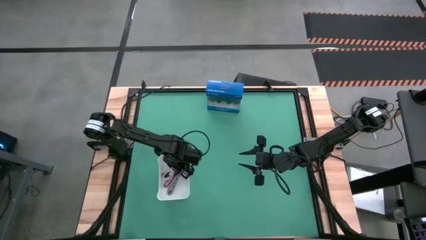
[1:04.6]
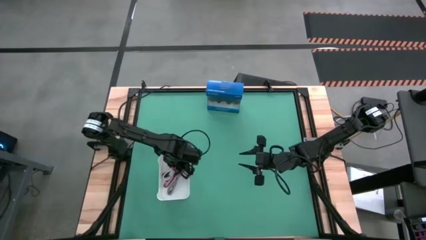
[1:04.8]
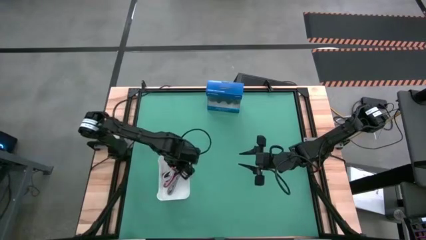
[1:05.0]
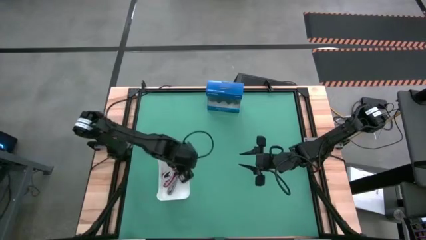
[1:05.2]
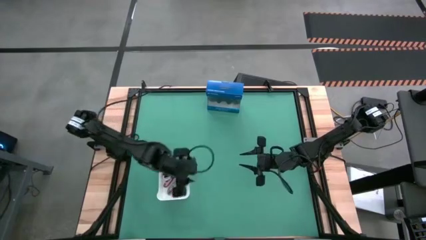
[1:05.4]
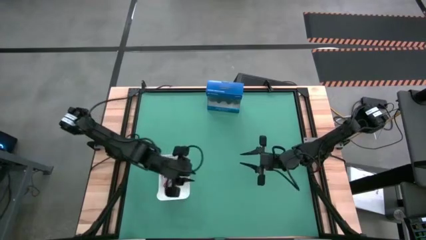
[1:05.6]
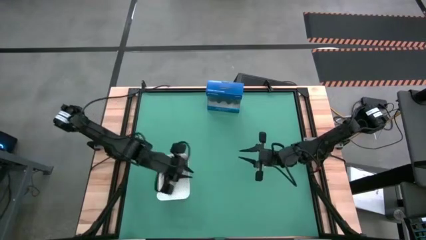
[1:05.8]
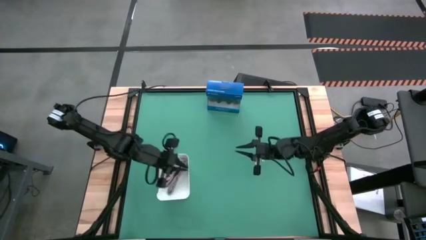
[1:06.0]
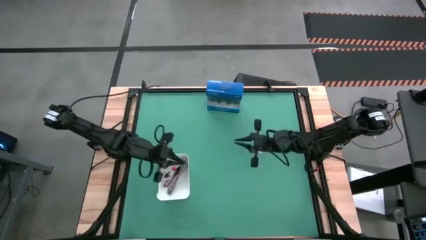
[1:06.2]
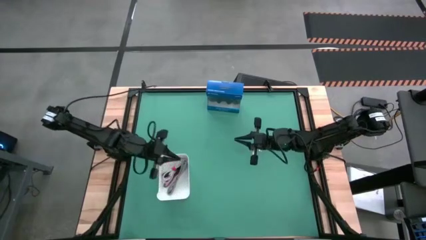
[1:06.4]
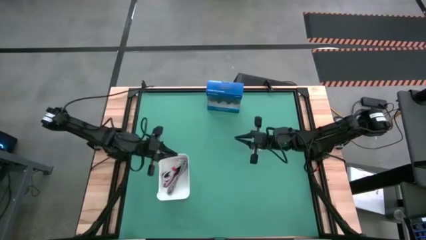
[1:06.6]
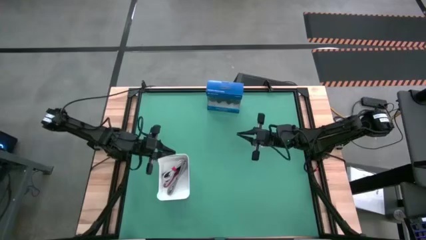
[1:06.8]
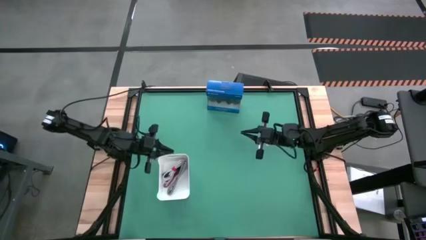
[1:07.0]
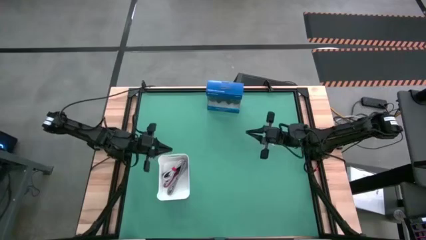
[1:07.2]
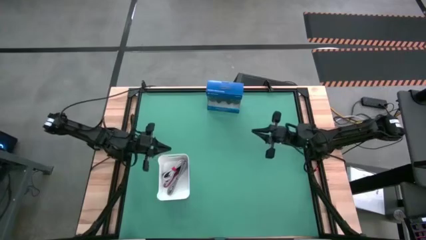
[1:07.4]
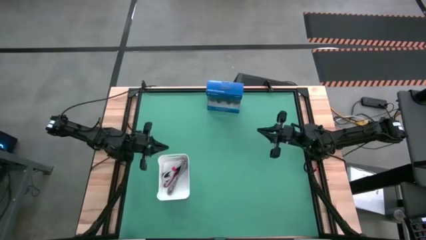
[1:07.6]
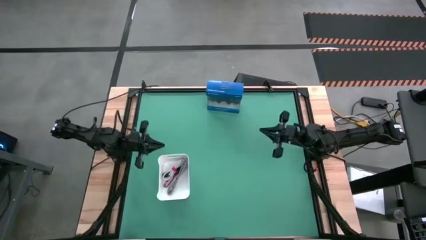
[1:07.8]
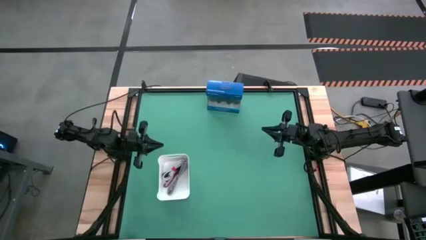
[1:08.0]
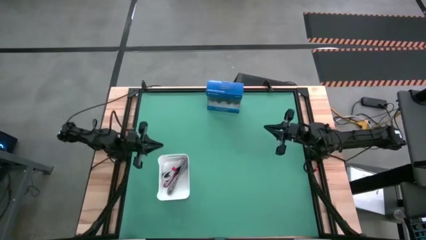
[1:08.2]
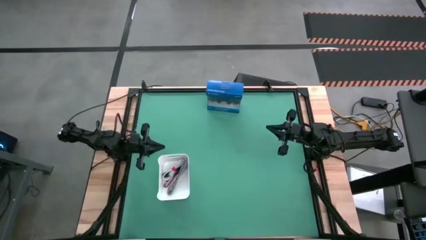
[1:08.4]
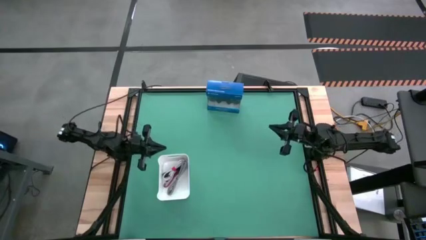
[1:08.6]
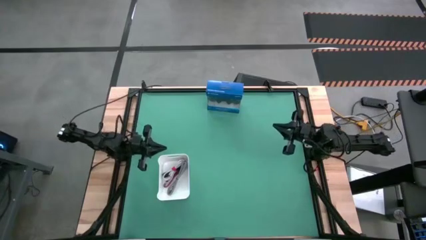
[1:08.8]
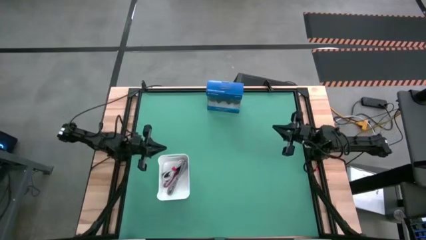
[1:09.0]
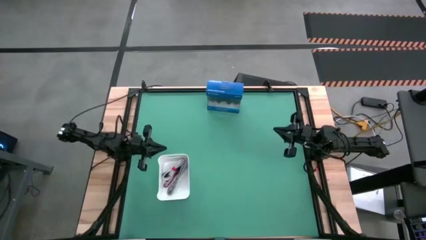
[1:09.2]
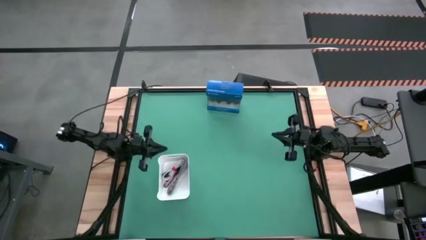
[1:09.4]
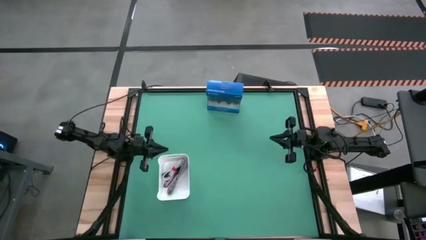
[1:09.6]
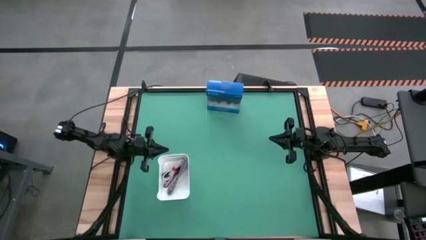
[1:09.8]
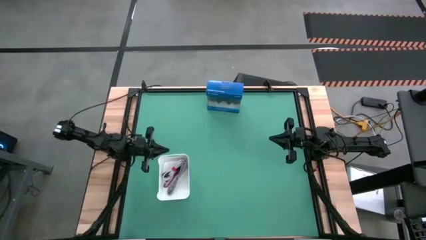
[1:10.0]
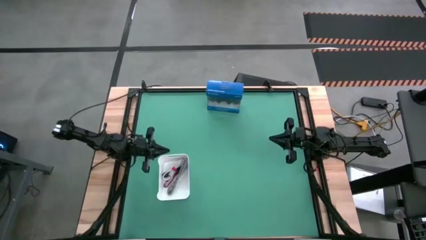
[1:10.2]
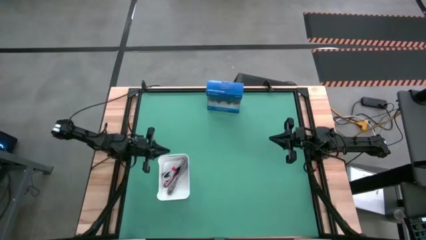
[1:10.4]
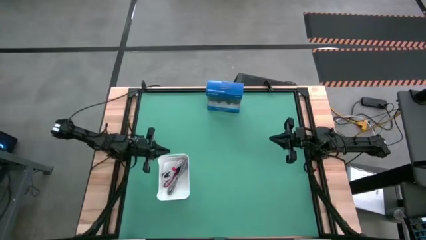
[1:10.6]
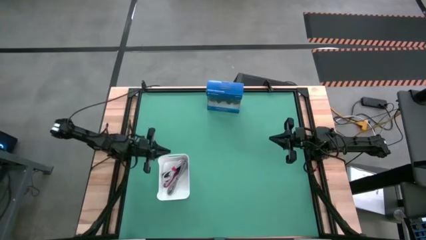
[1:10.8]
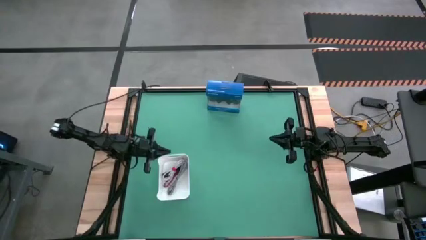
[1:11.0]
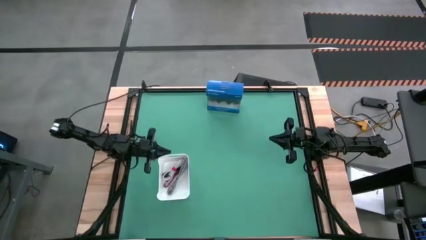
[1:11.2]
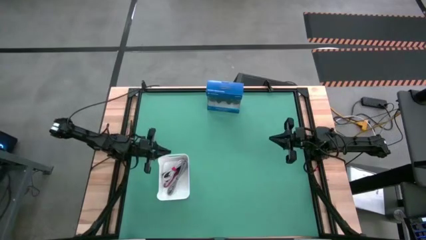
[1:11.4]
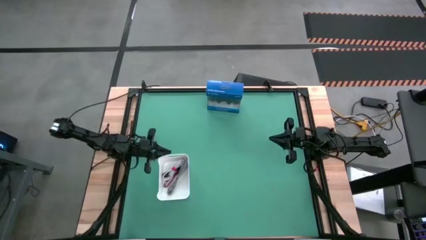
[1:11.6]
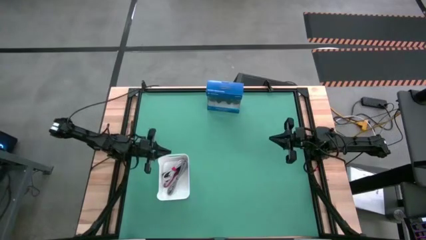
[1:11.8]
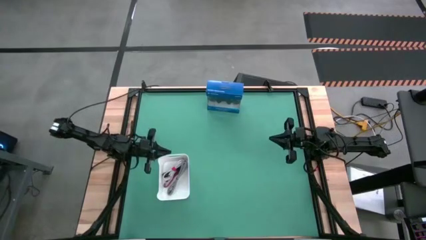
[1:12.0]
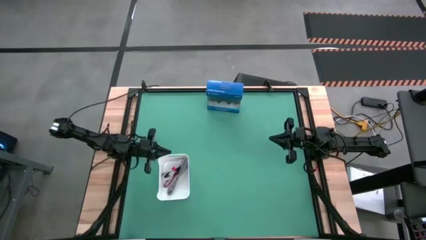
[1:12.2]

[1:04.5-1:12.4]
Task: Pick and place USB-C Cables
Return to Home Position

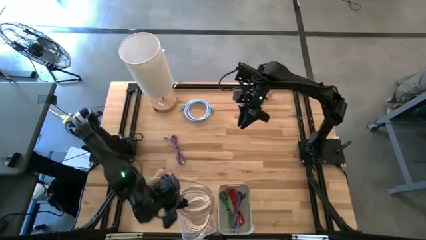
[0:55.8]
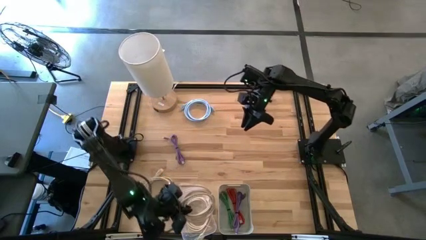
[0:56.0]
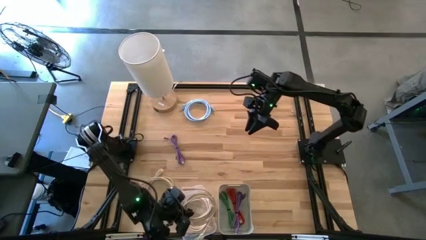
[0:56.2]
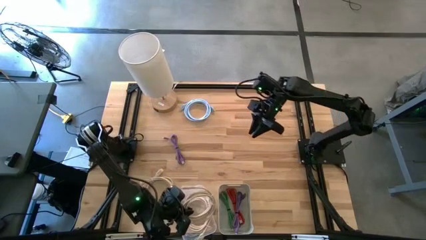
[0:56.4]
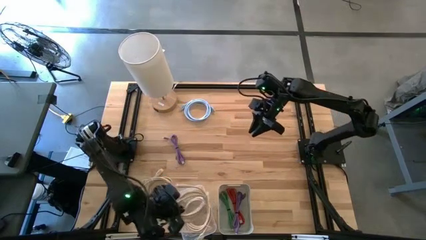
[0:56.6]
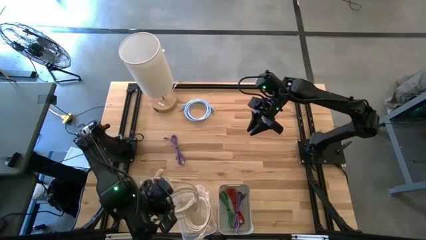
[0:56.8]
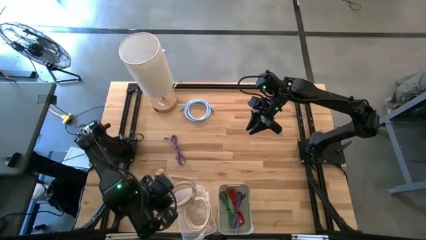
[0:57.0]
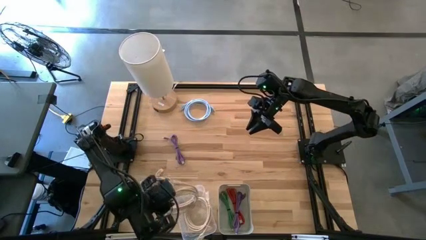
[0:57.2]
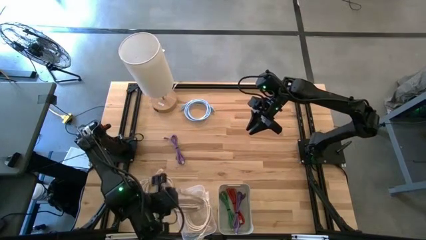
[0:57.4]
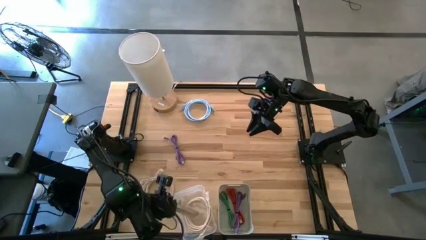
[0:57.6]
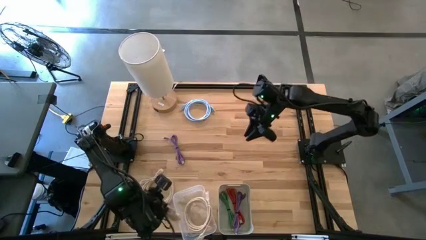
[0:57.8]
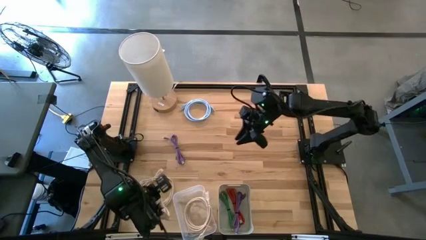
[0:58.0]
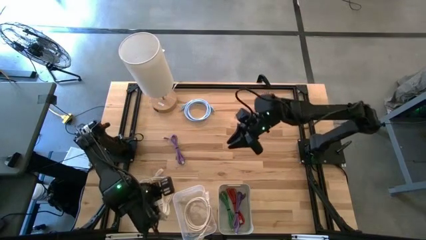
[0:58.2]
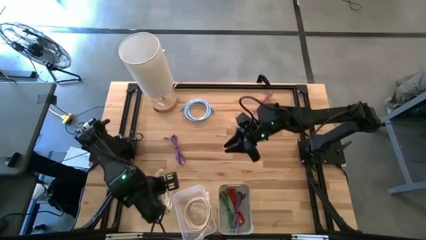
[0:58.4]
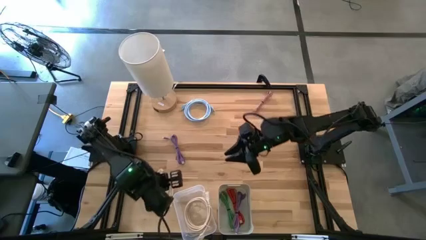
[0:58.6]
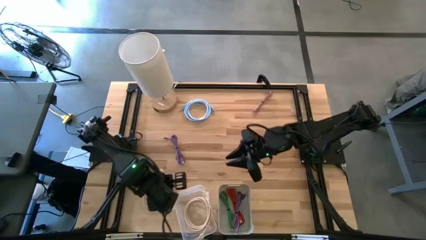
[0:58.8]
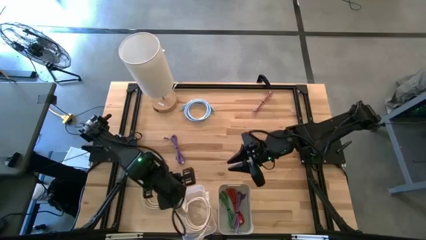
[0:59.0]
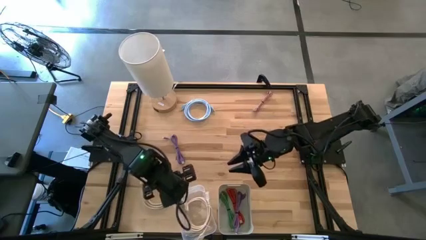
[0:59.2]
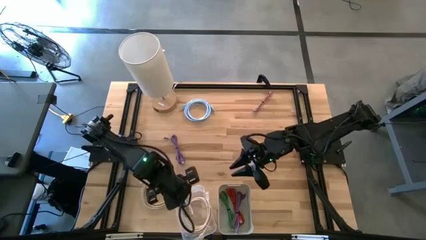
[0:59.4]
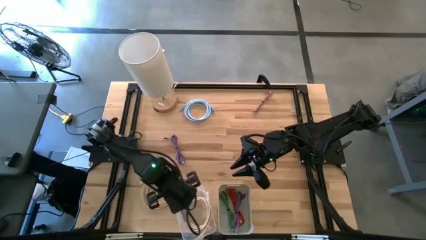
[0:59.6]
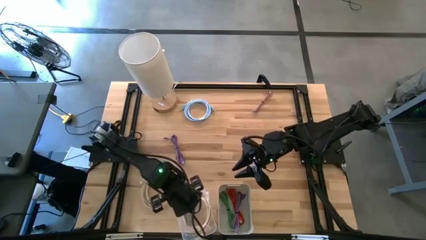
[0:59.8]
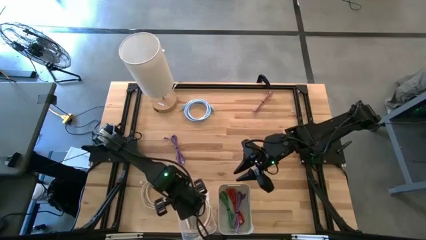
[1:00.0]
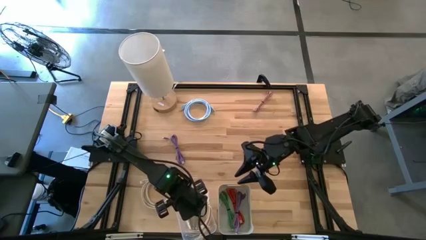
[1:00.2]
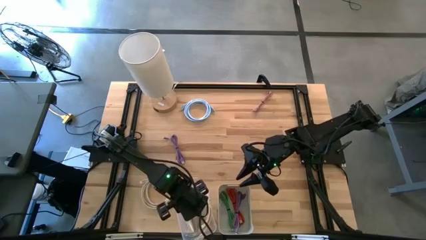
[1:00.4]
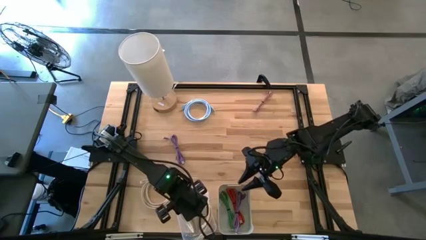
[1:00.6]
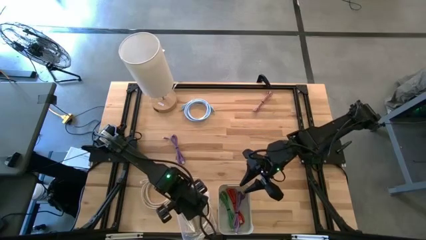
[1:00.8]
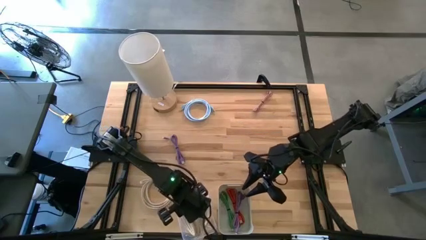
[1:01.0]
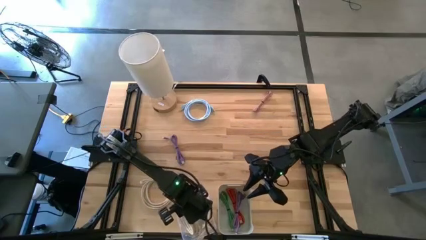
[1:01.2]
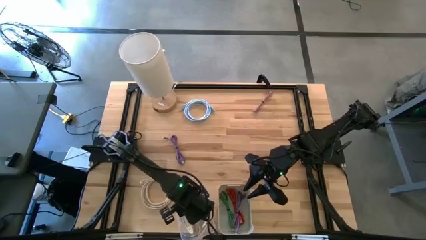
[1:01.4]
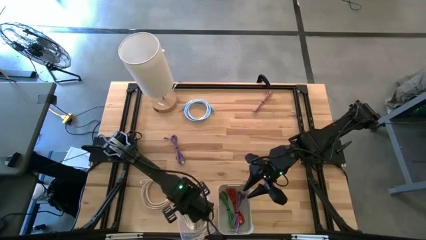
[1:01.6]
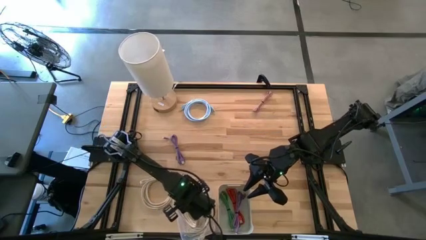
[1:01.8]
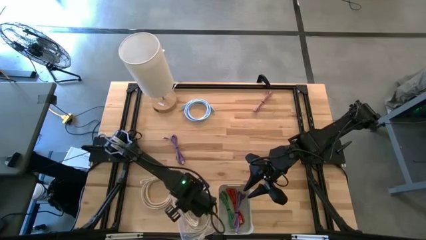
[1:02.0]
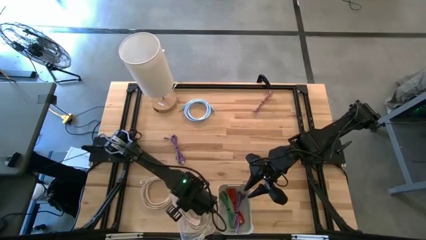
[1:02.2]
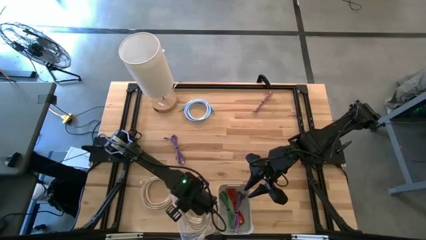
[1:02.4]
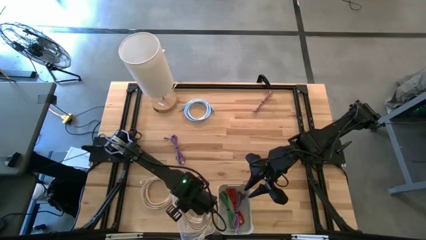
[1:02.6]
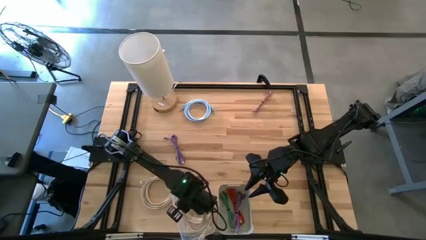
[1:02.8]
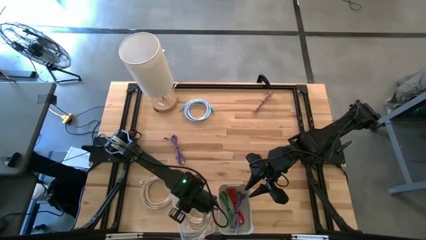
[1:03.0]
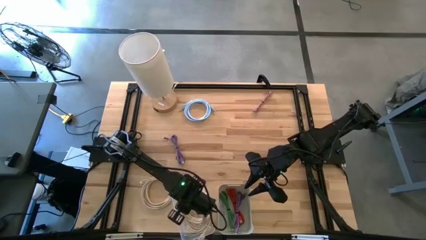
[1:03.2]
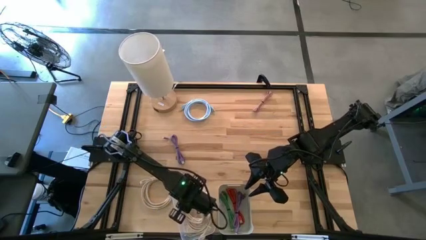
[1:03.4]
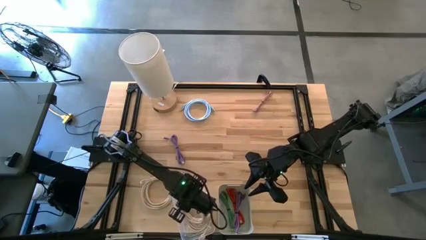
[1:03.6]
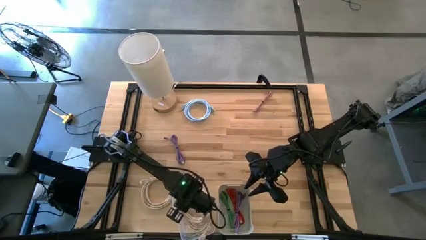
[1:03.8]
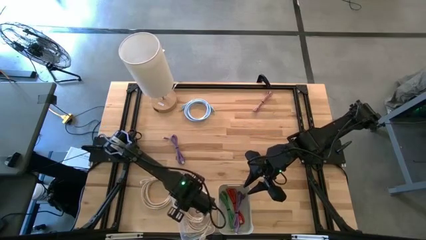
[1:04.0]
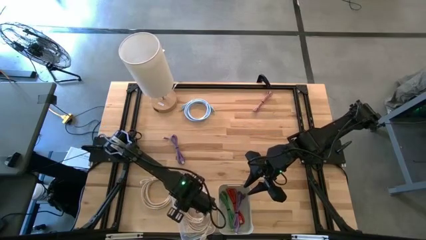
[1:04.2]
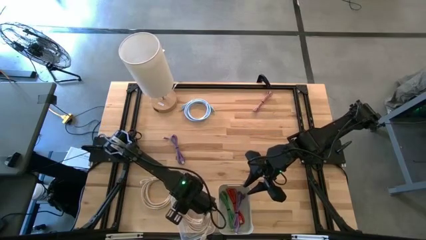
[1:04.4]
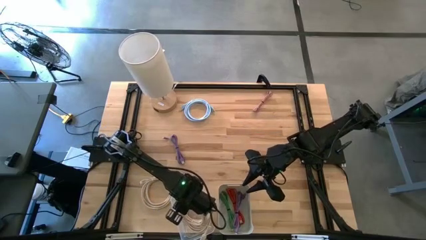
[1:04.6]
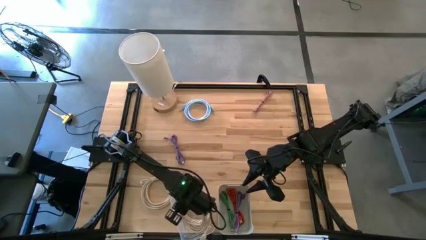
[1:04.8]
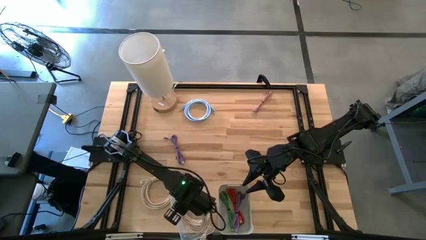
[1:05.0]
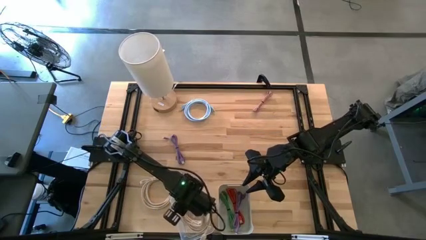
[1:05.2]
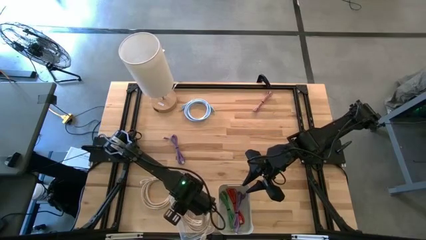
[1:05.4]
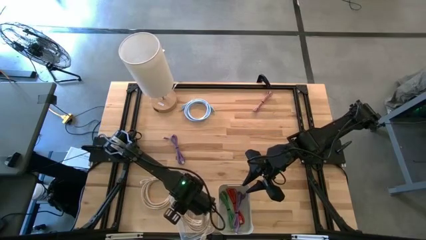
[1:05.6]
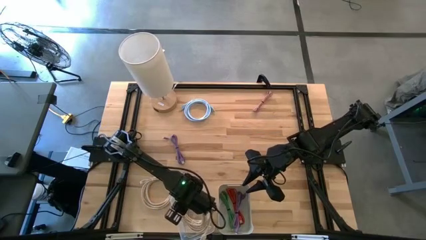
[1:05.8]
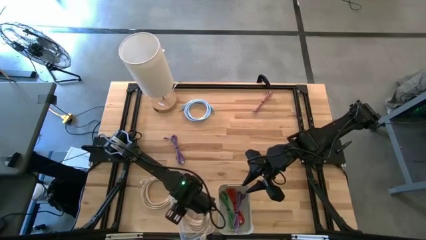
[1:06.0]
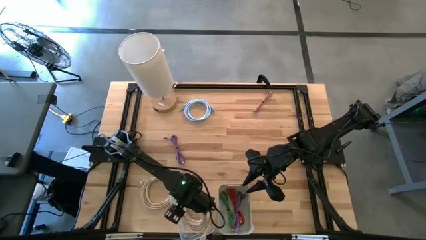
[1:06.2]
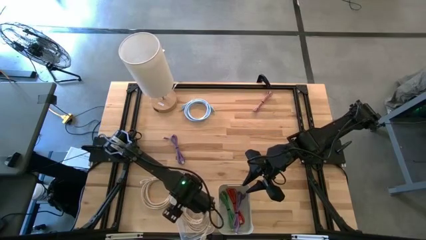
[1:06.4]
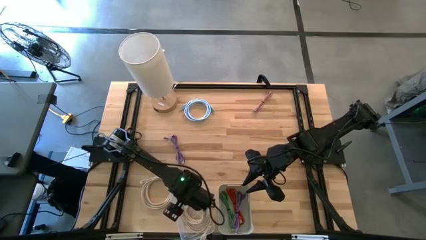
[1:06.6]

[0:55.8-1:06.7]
Task: Pick & Place USB Port
Put the top brown HDMI cable into the transparent bin
